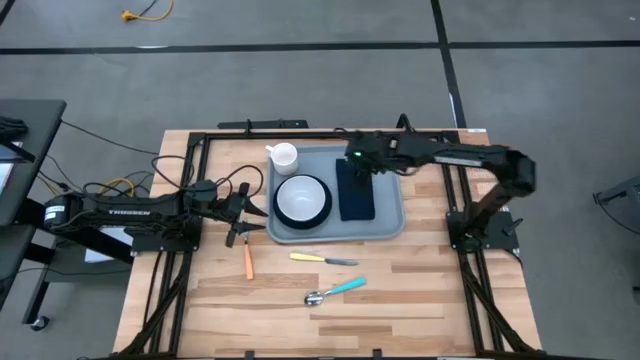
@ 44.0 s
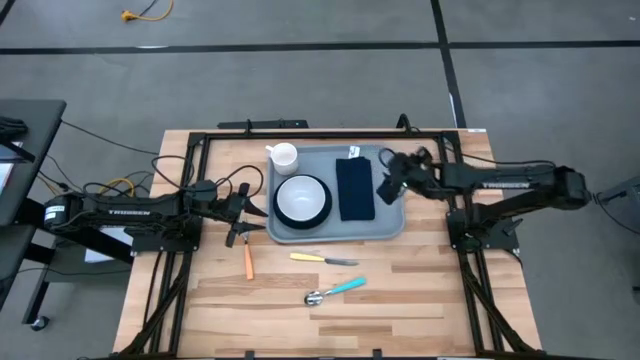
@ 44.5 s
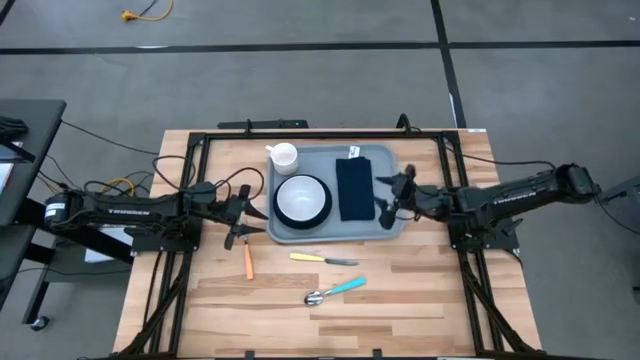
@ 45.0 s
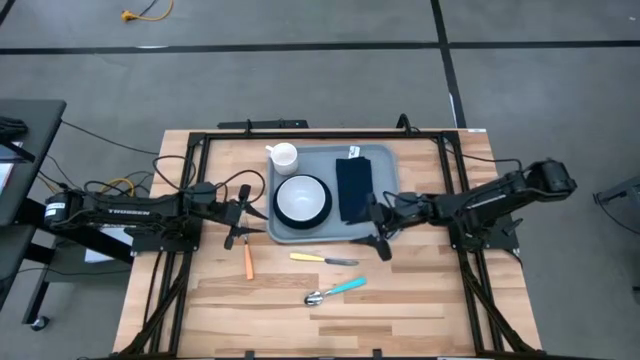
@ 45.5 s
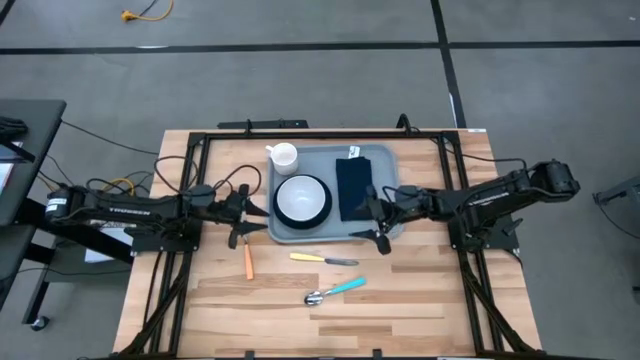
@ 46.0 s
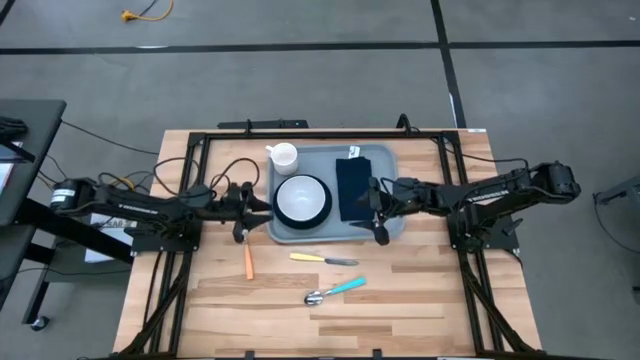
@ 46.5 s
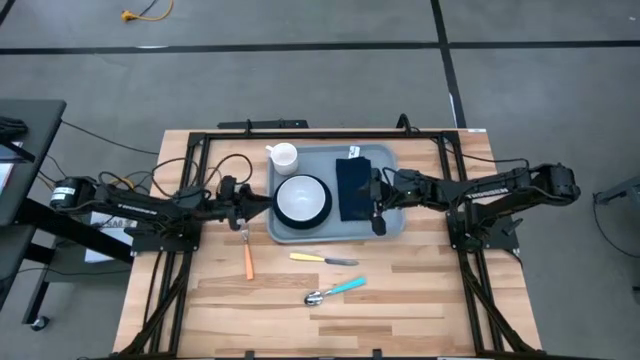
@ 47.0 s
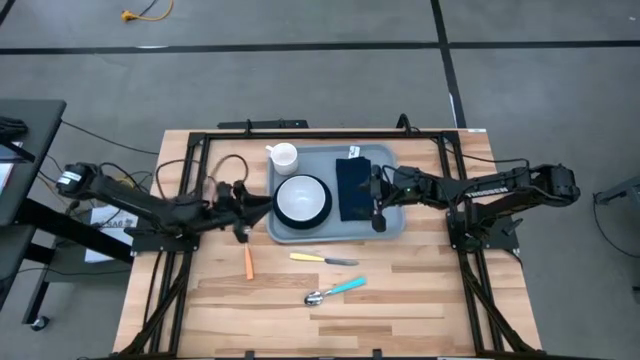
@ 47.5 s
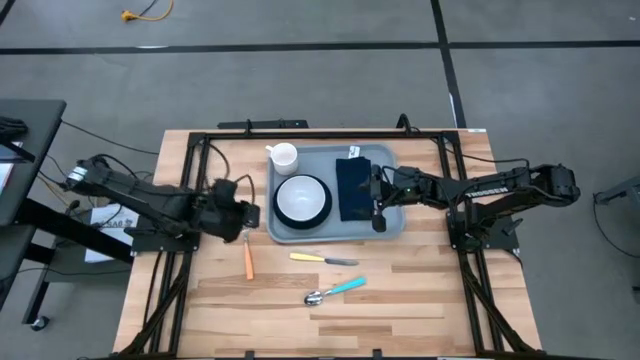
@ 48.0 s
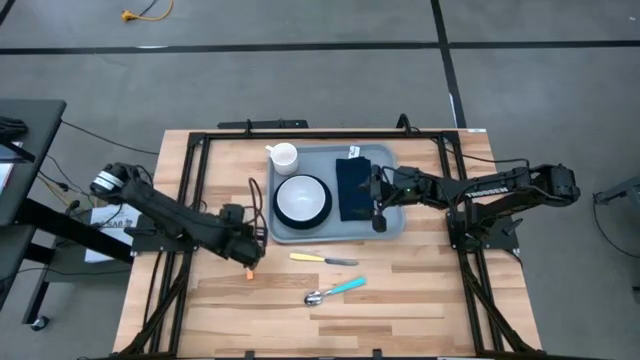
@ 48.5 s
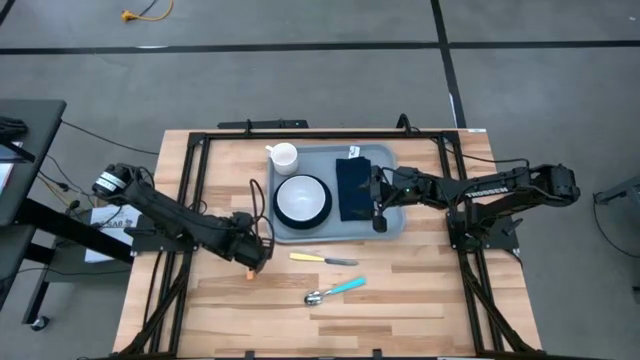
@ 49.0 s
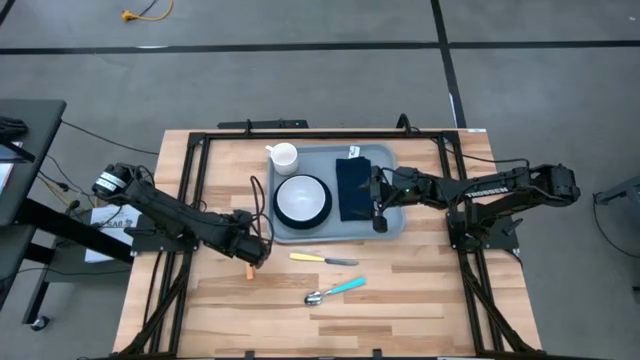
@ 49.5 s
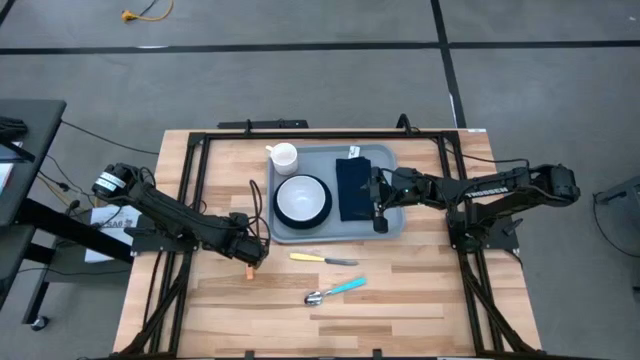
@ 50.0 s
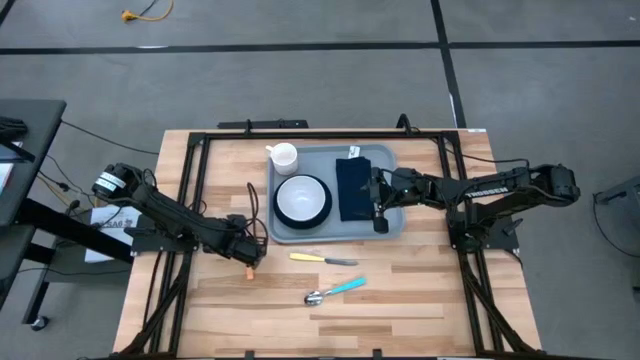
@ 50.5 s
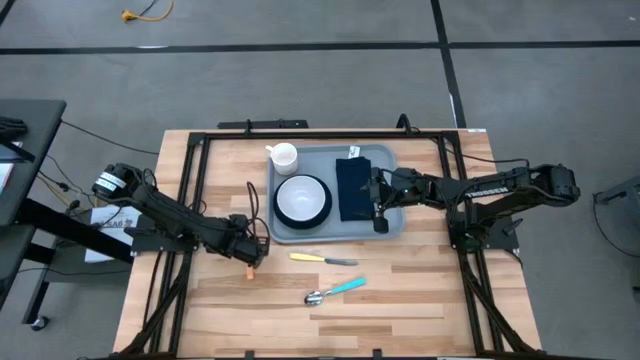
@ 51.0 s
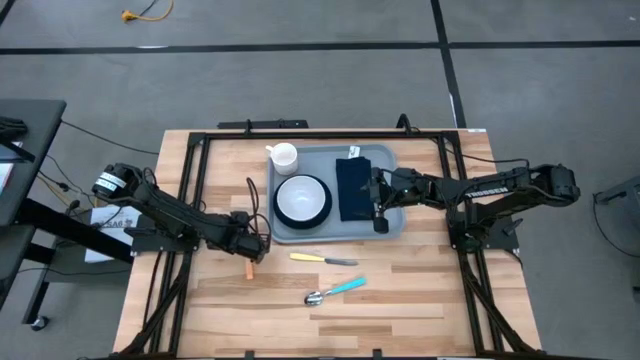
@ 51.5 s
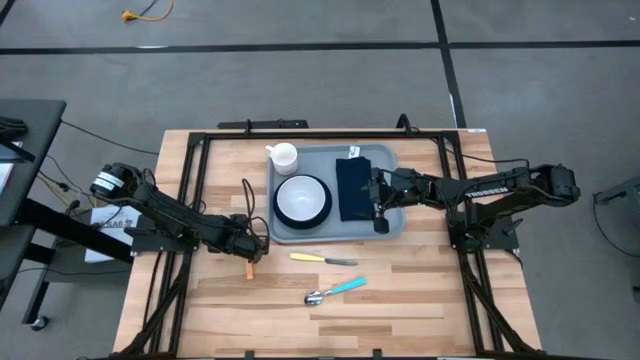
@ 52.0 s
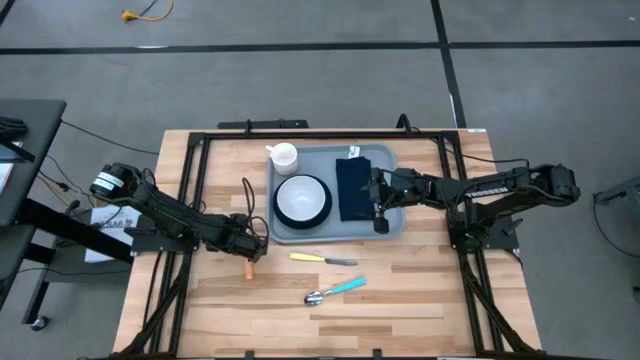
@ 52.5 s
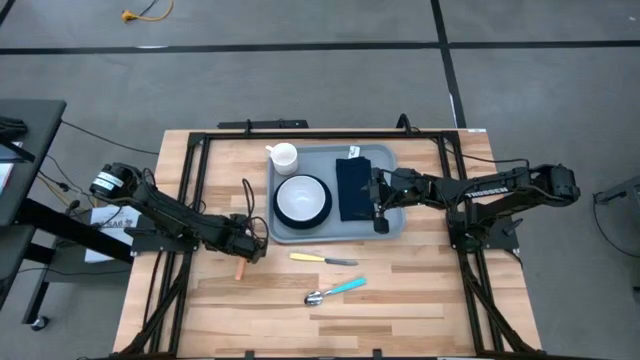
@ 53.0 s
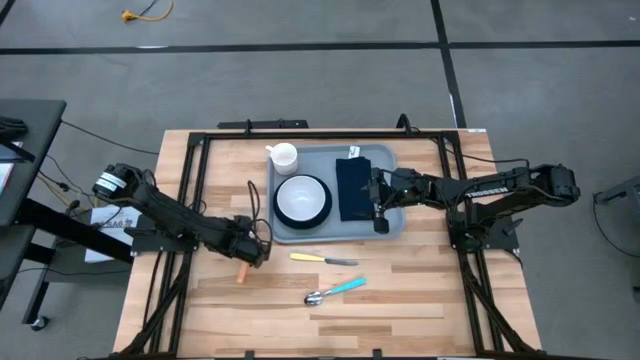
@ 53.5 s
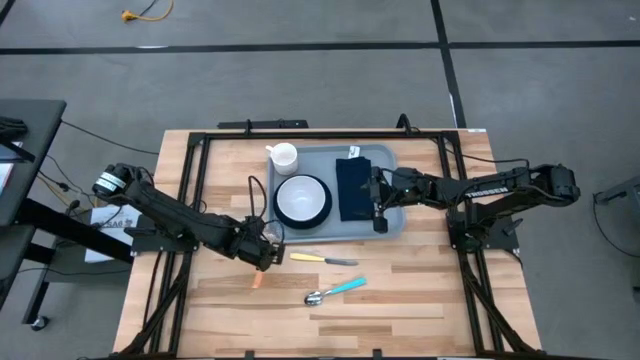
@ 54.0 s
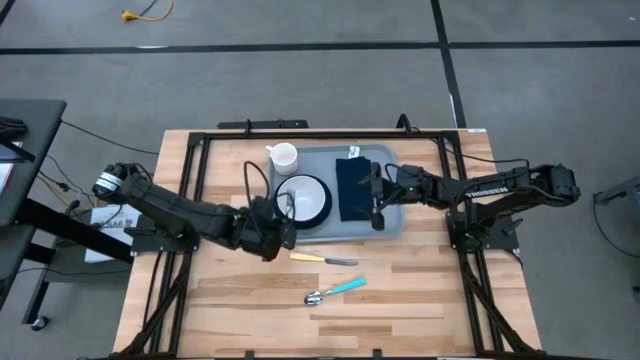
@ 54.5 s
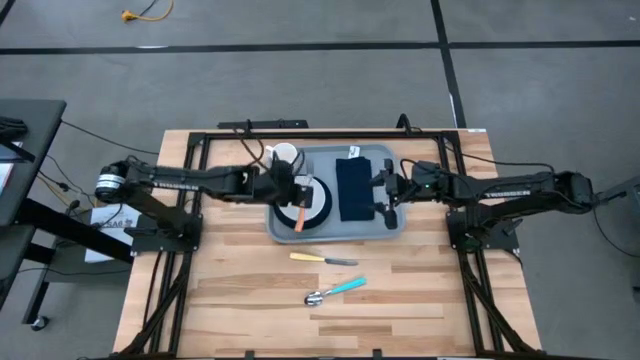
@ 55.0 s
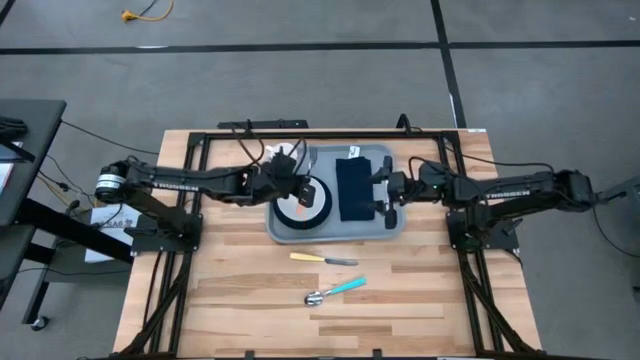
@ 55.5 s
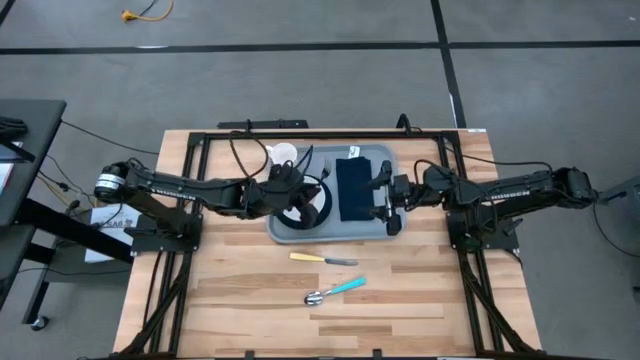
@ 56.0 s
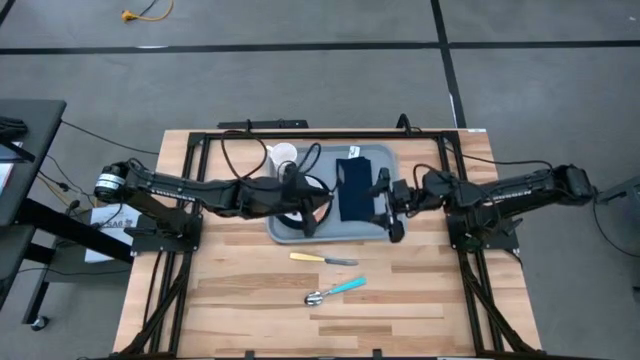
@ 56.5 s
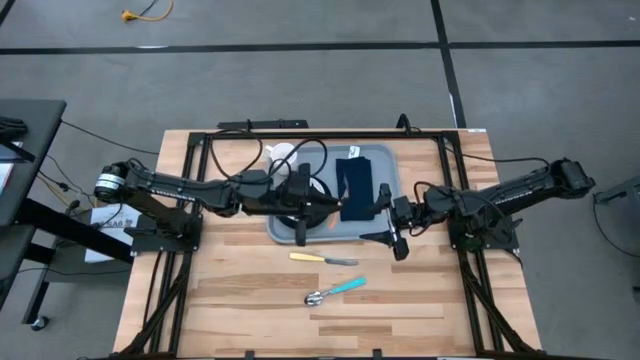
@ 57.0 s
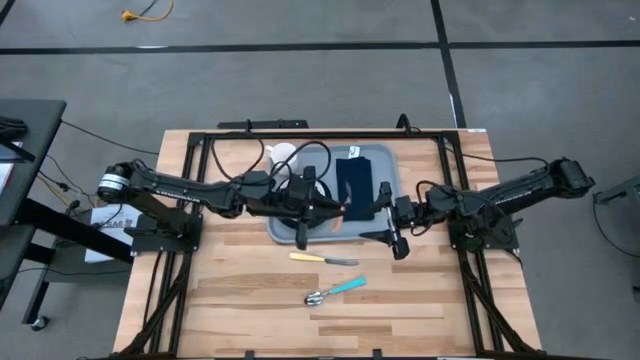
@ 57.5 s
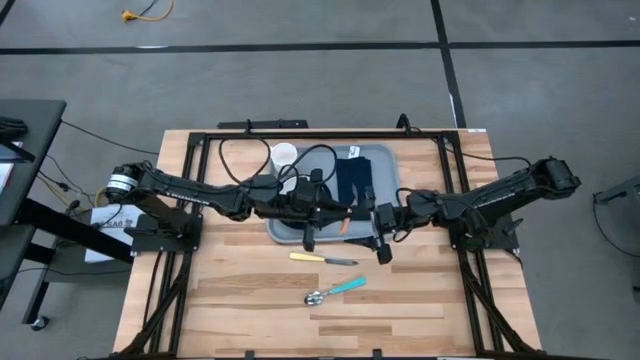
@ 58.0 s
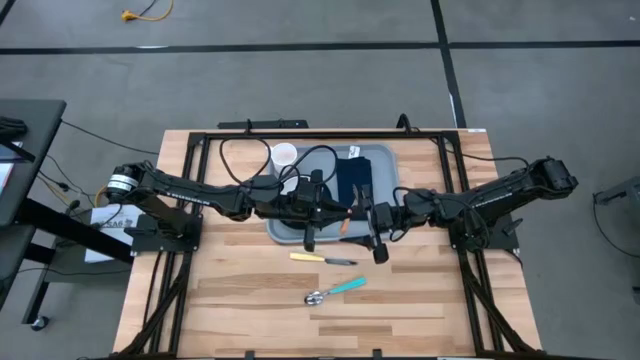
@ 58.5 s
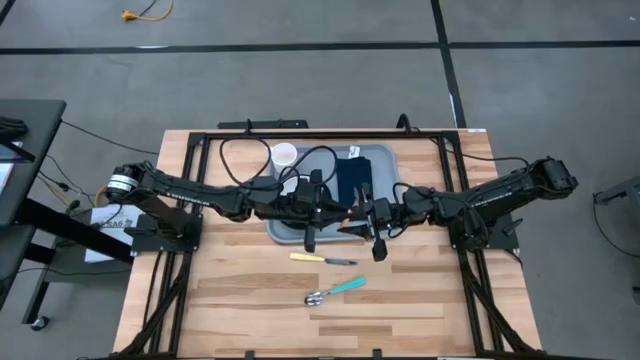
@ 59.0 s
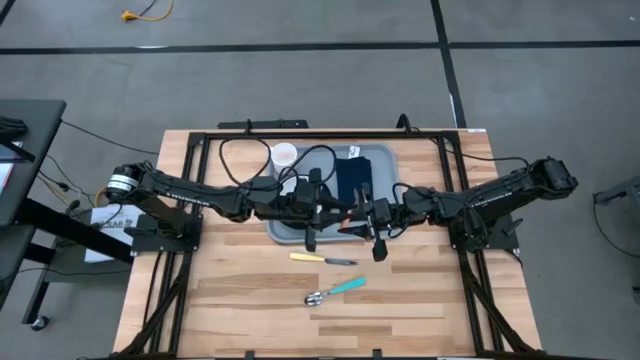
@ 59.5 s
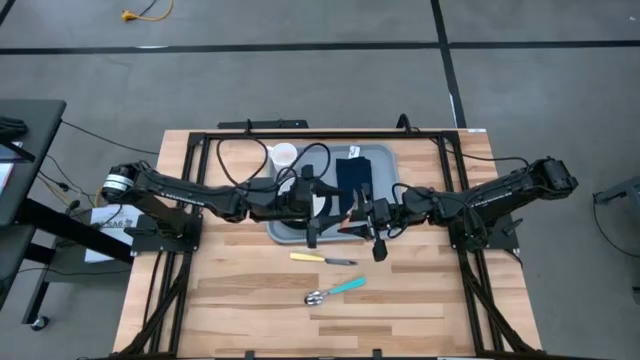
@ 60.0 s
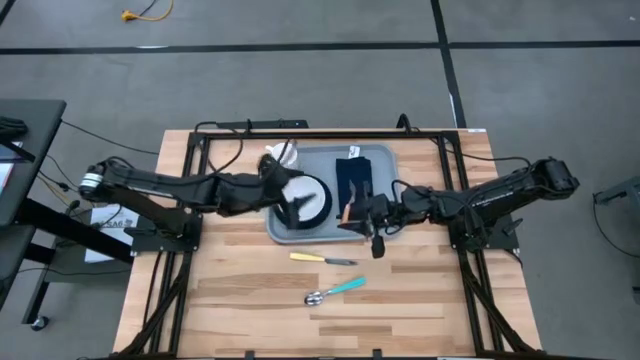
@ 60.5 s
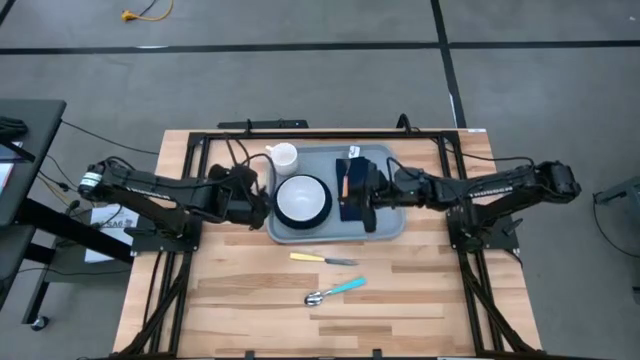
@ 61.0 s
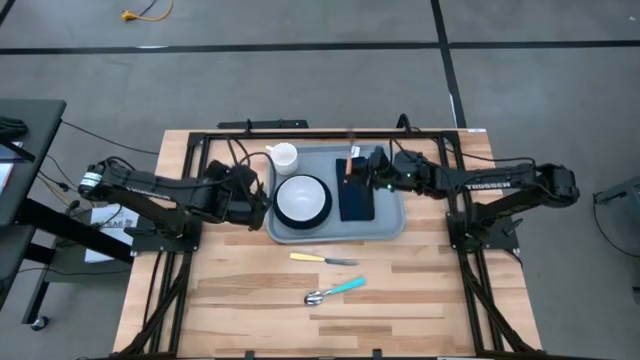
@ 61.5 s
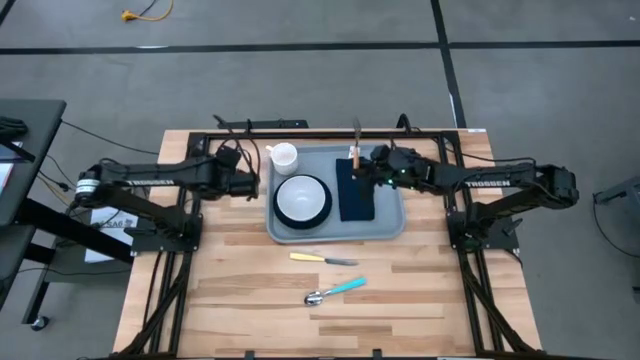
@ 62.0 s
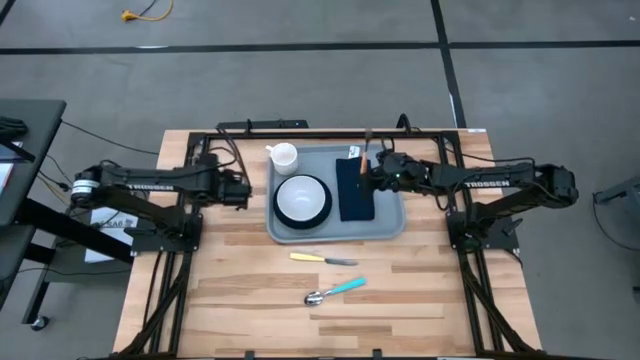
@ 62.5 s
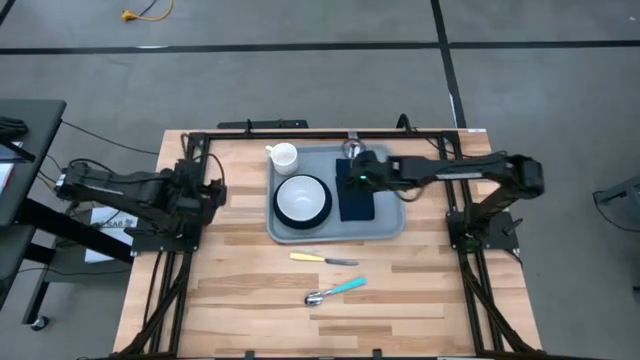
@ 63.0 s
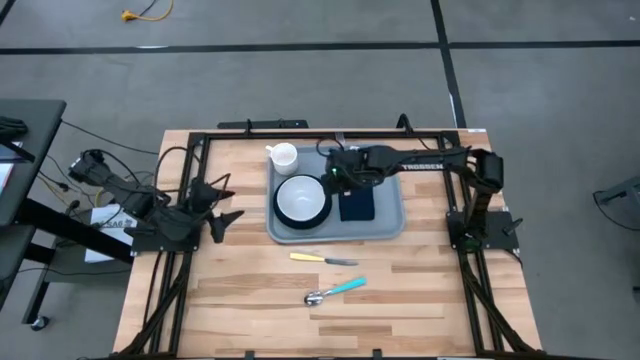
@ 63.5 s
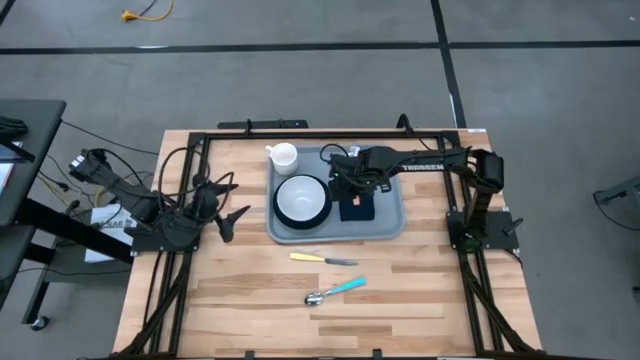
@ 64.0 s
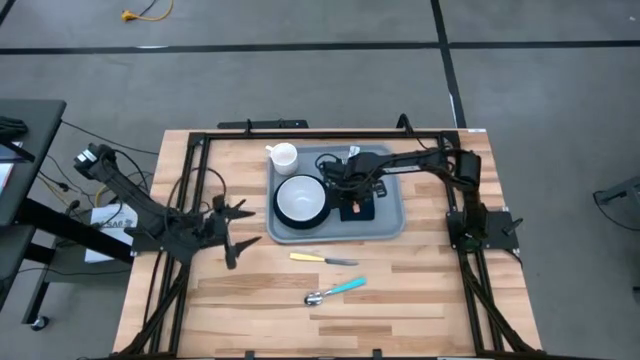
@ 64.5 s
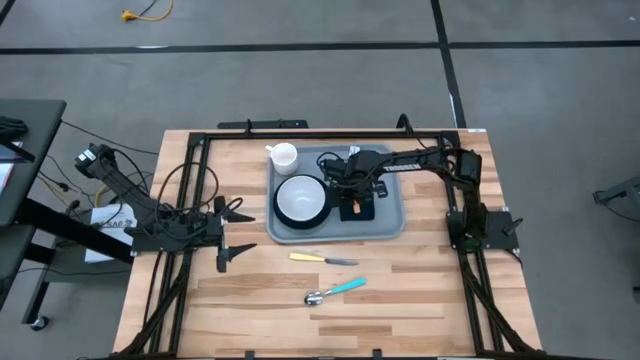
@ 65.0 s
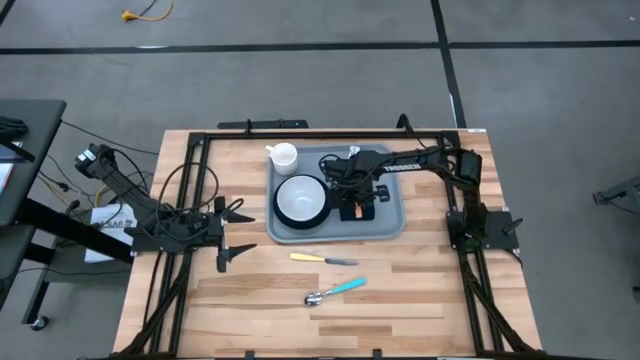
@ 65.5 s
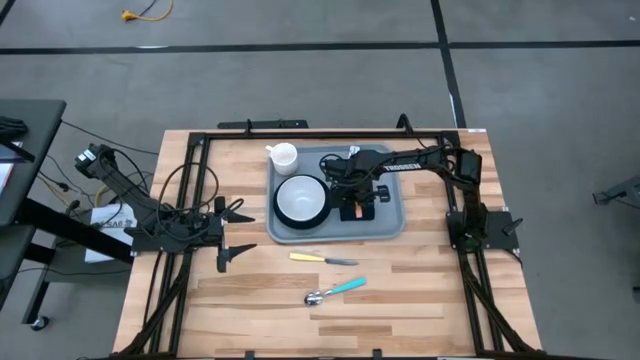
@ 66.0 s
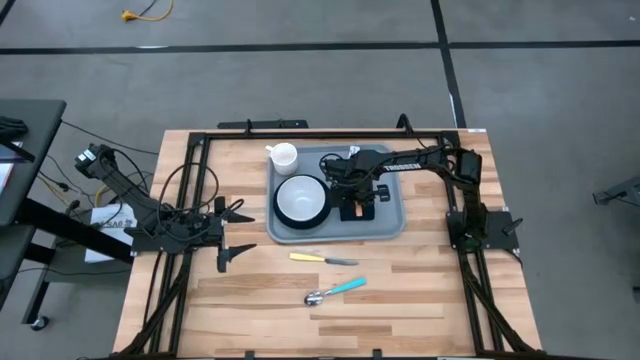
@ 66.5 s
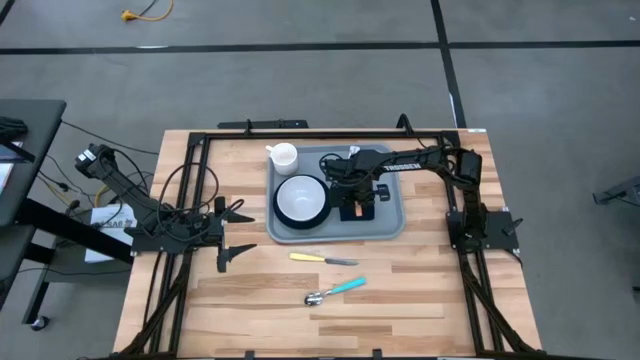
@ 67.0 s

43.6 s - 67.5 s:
Task: Set up tray
Put the orange fork on top of the black napkin on the gray tray
